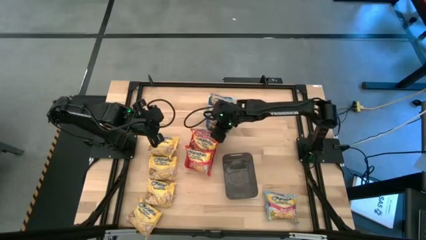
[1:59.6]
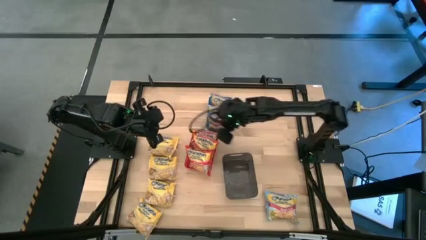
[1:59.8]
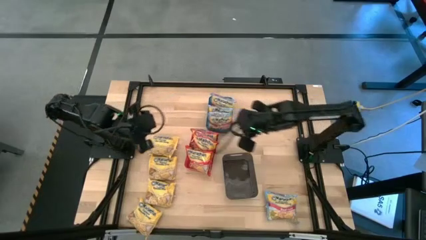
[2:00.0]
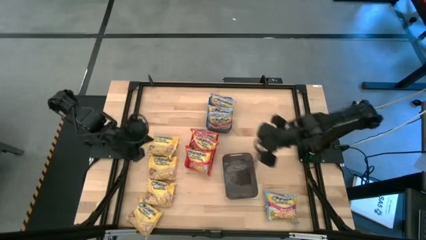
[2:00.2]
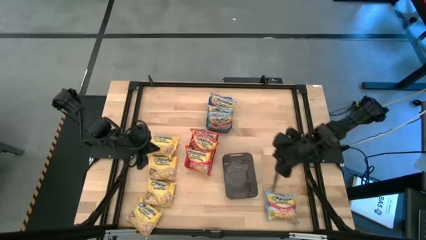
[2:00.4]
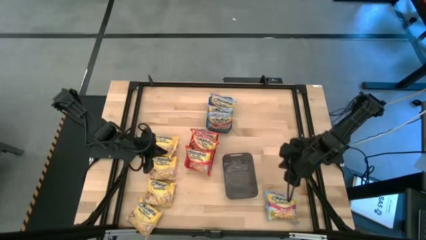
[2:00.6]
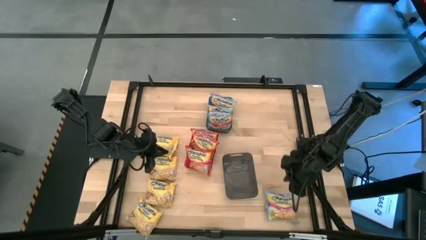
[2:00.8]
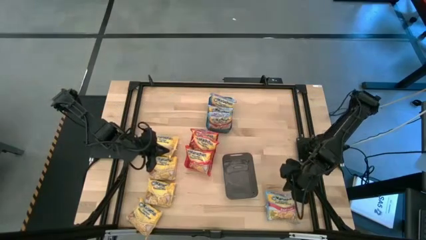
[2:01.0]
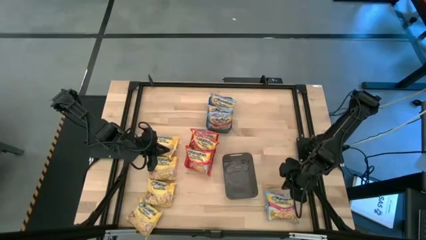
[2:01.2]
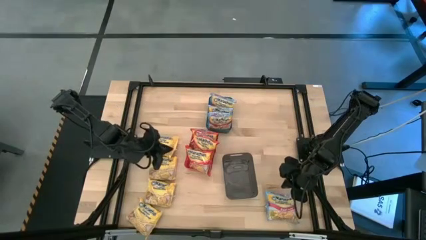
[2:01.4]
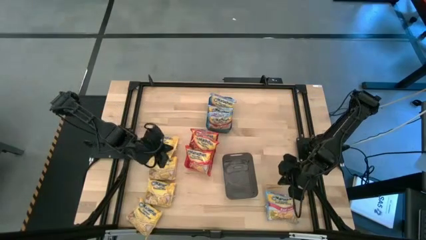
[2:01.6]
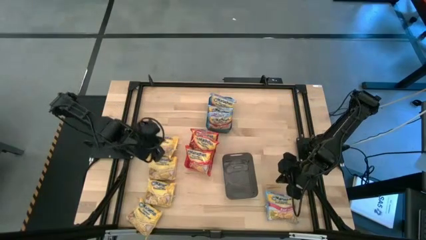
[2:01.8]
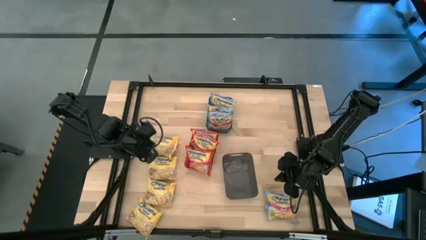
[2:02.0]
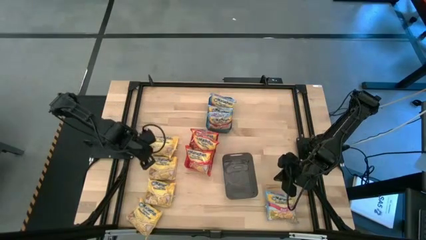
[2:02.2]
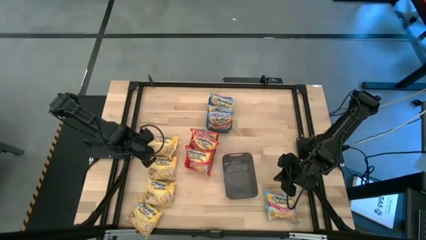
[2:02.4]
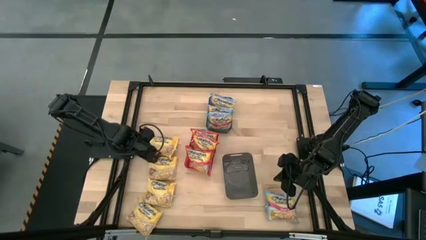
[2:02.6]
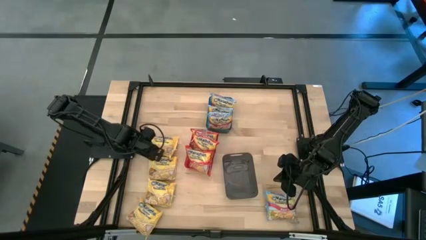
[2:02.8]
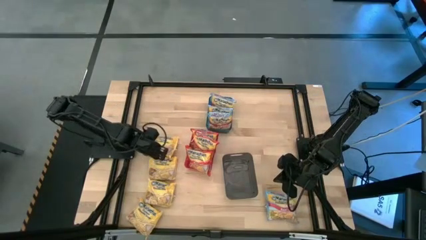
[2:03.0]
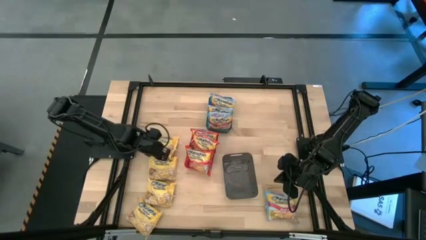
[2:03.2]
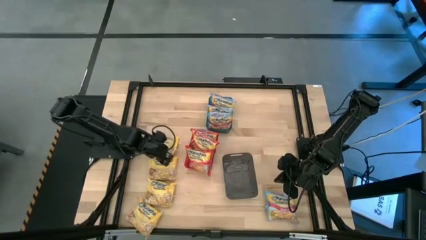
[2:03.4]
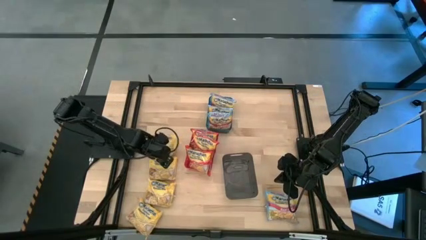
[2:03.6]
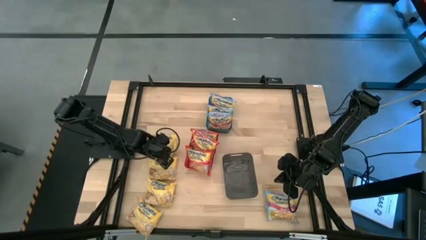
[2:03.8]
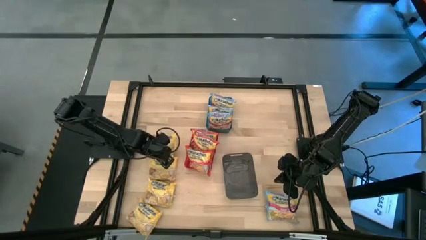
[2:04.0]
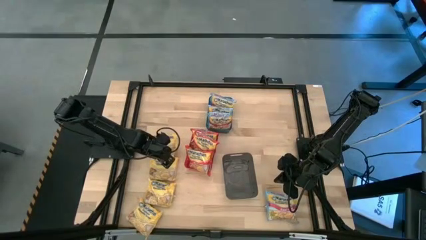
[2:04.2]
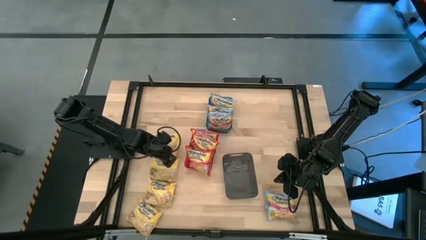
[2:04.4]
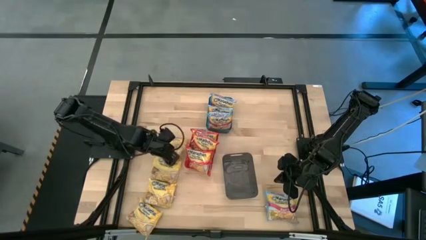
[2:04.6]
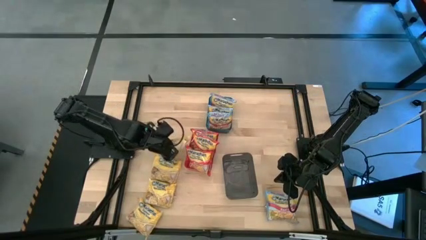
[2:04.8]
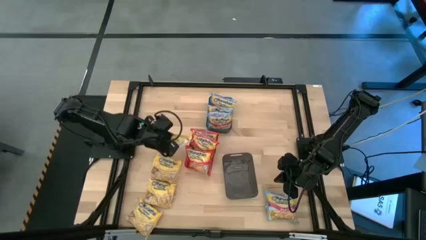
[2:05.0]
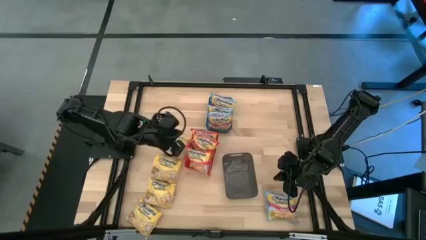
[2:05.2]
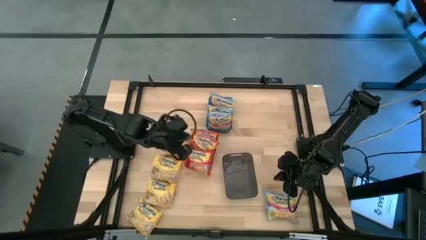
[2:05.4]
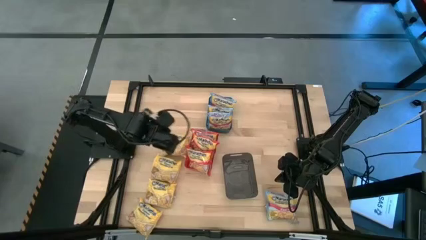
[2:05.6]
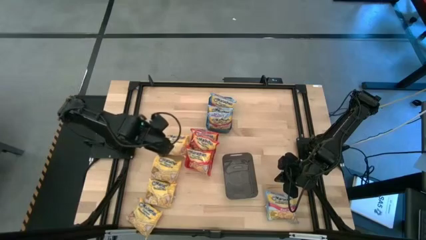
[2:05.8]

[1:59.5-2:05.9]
Task: Sort Maruchan noodles
Put the yellow bag into the black bin

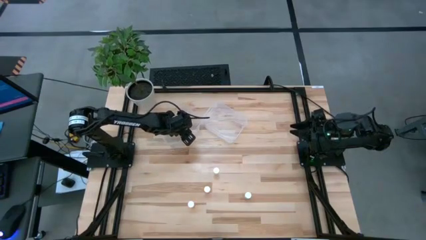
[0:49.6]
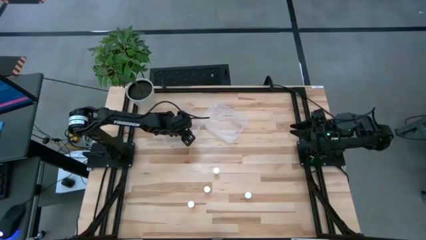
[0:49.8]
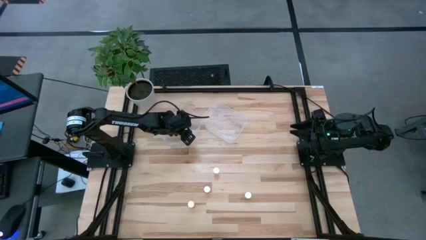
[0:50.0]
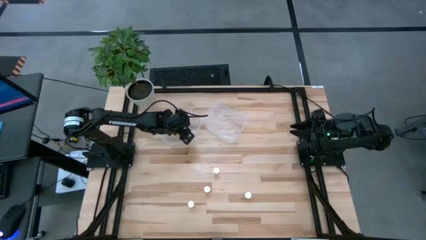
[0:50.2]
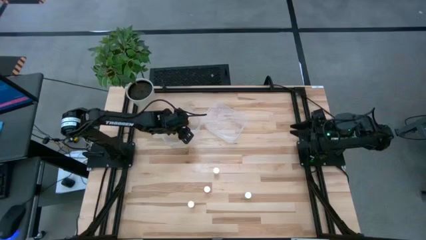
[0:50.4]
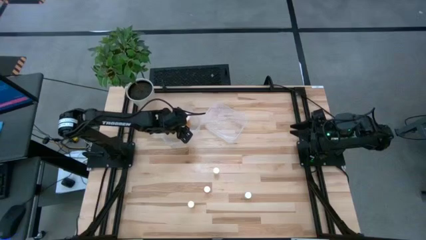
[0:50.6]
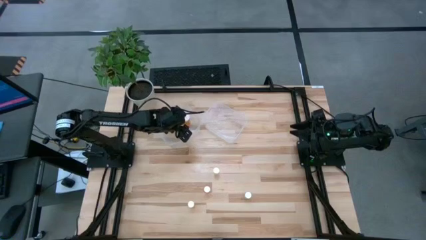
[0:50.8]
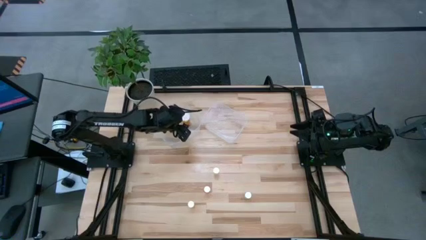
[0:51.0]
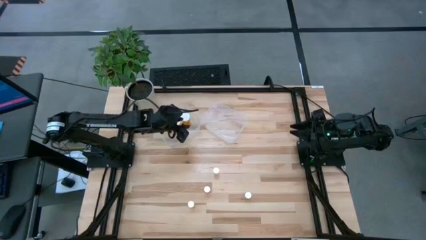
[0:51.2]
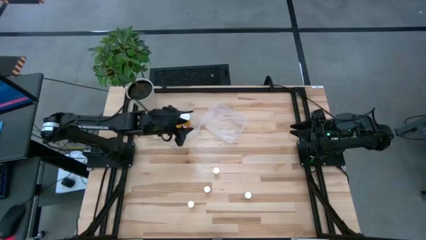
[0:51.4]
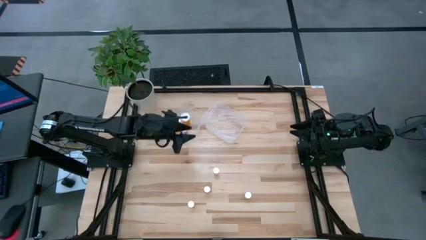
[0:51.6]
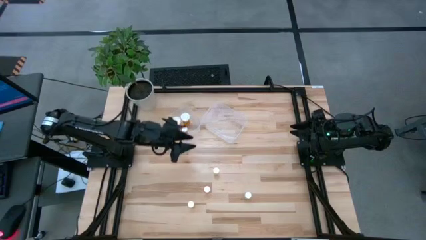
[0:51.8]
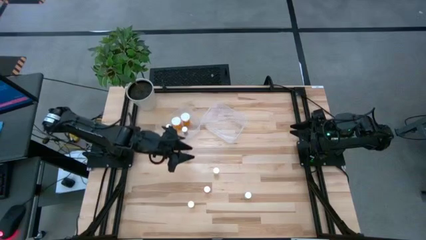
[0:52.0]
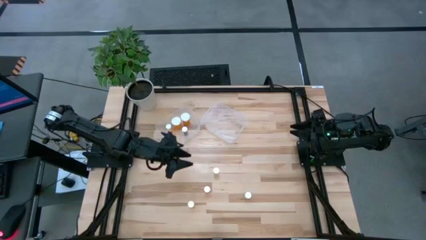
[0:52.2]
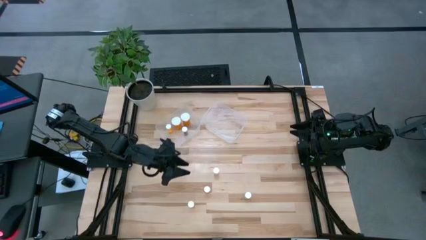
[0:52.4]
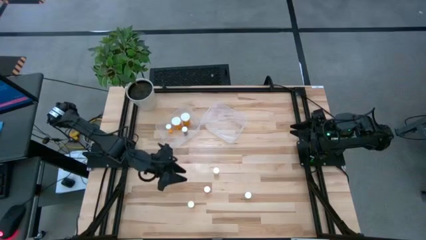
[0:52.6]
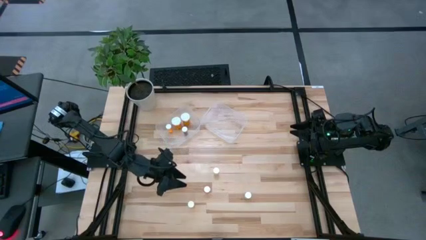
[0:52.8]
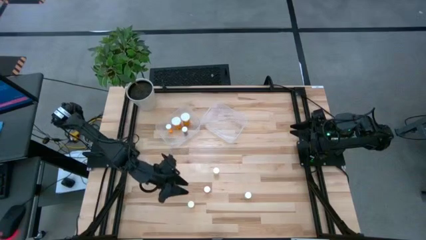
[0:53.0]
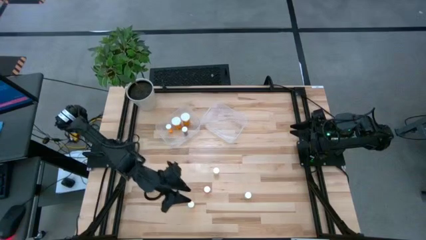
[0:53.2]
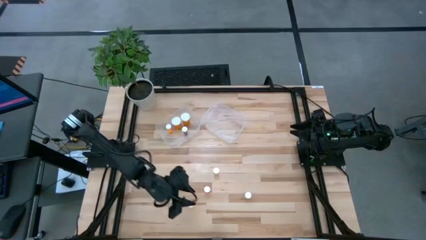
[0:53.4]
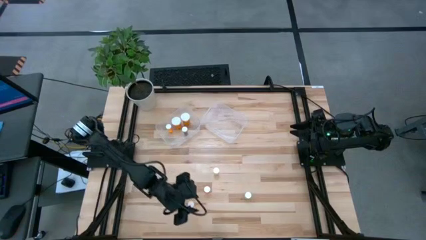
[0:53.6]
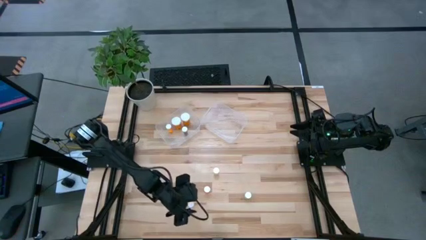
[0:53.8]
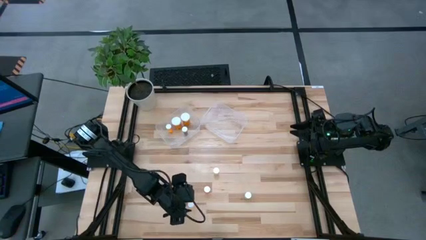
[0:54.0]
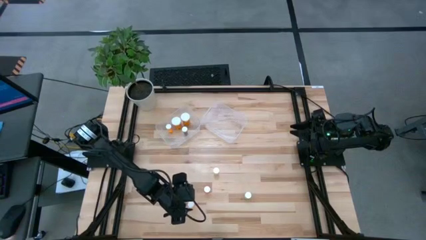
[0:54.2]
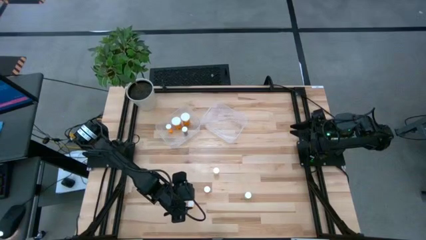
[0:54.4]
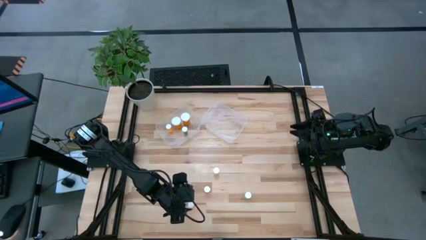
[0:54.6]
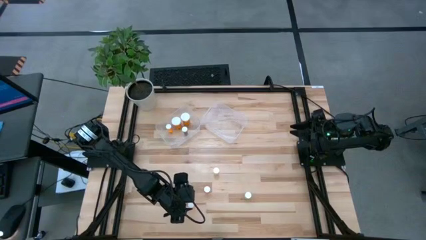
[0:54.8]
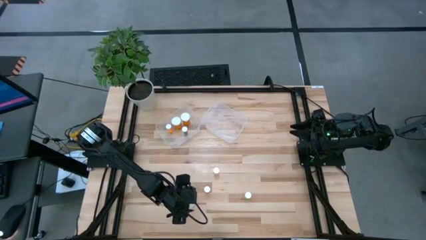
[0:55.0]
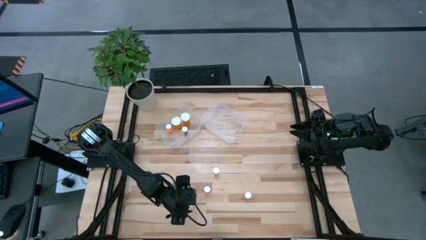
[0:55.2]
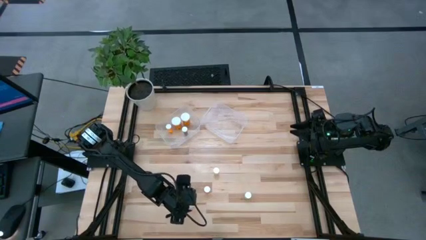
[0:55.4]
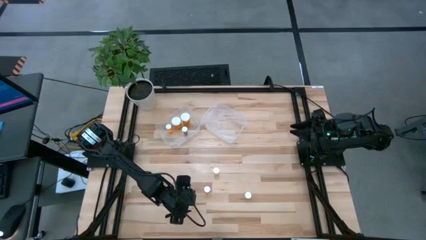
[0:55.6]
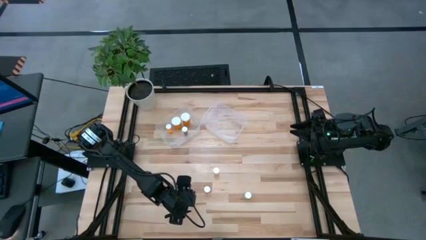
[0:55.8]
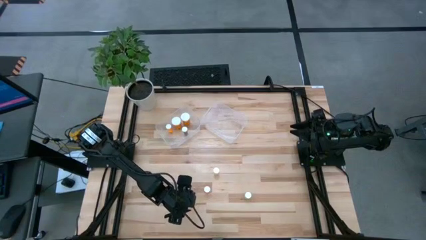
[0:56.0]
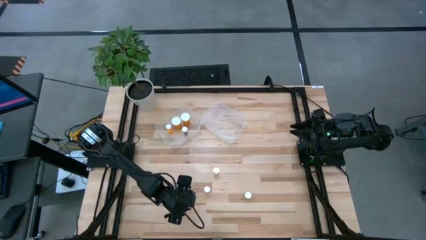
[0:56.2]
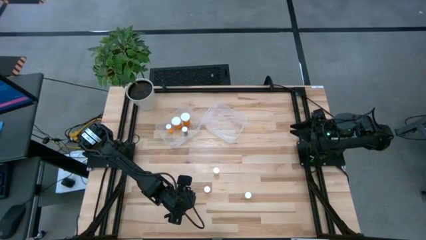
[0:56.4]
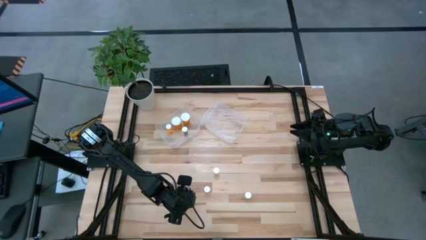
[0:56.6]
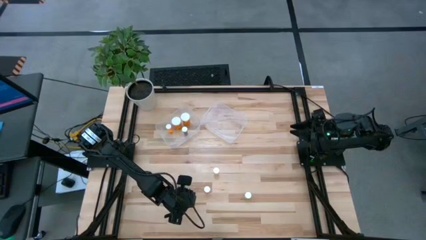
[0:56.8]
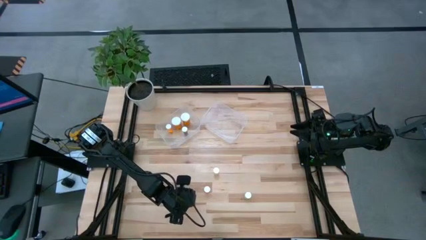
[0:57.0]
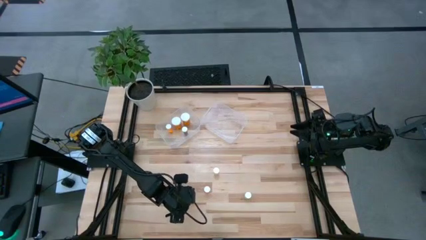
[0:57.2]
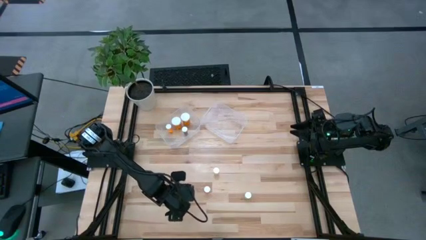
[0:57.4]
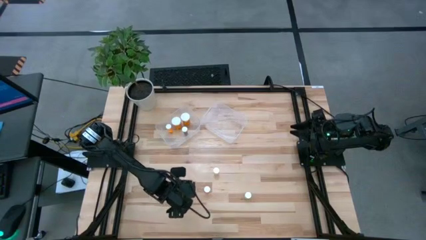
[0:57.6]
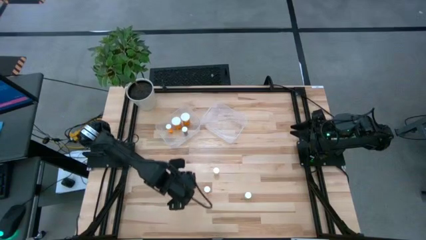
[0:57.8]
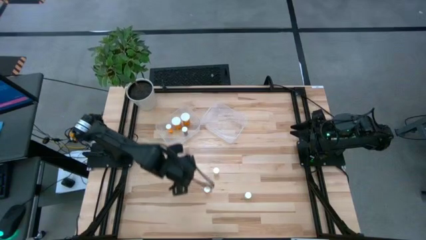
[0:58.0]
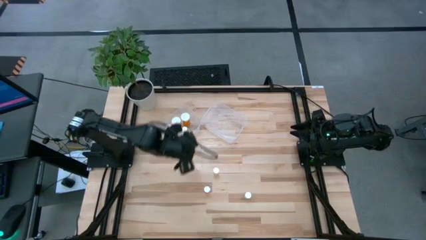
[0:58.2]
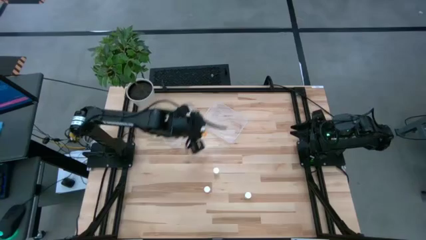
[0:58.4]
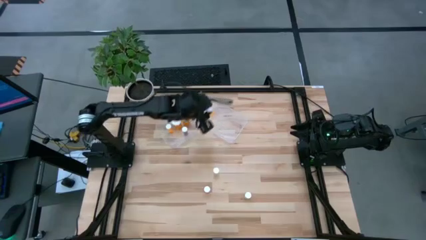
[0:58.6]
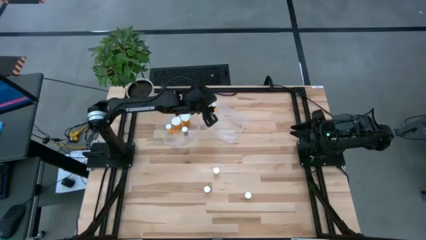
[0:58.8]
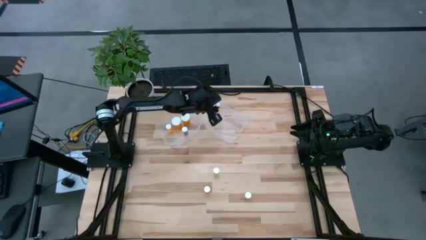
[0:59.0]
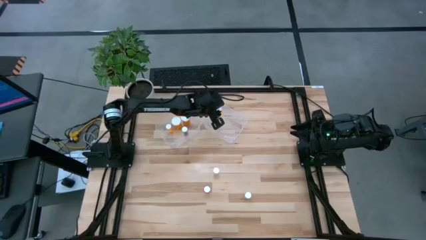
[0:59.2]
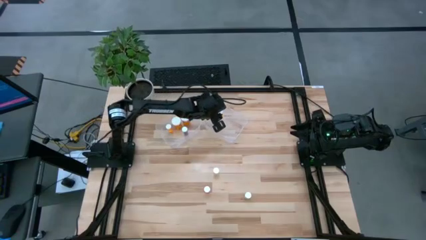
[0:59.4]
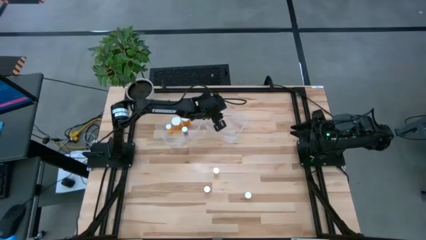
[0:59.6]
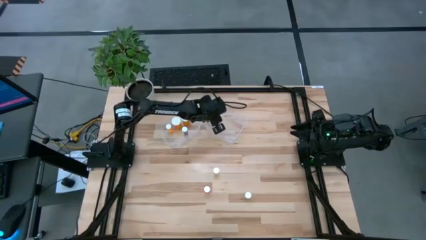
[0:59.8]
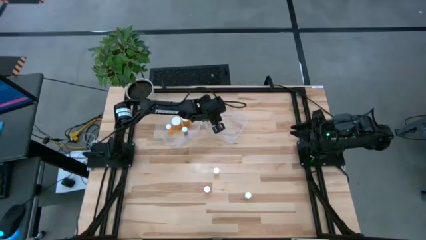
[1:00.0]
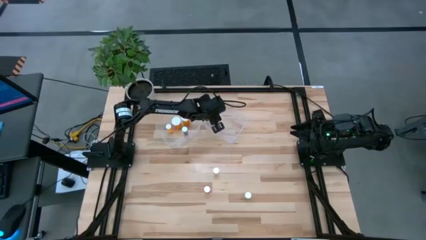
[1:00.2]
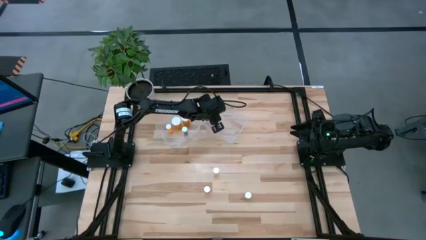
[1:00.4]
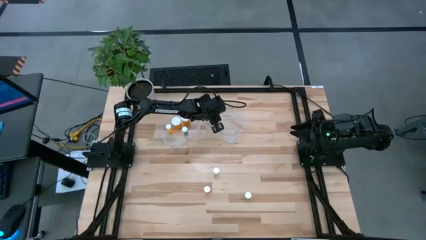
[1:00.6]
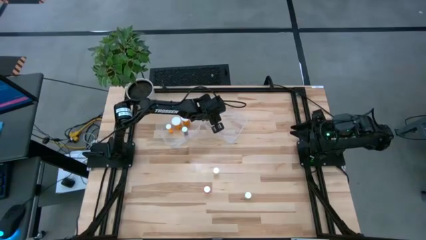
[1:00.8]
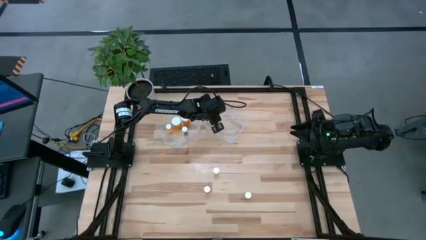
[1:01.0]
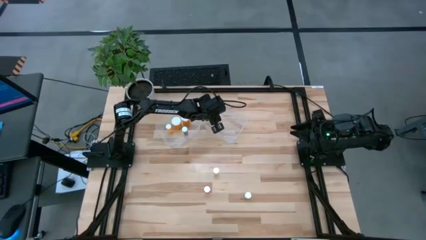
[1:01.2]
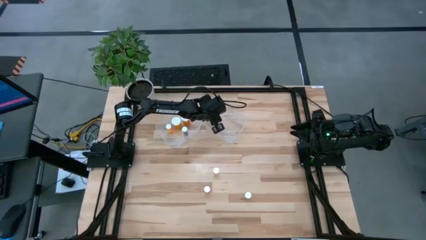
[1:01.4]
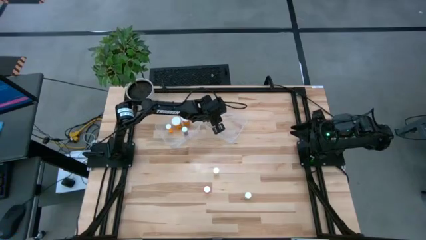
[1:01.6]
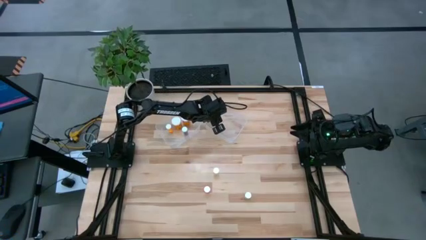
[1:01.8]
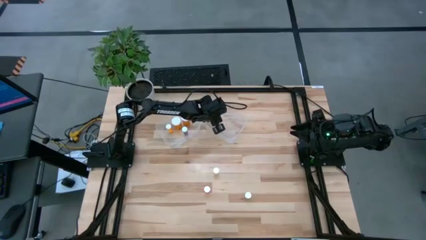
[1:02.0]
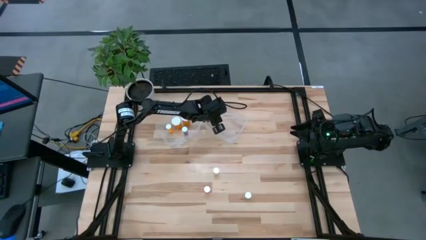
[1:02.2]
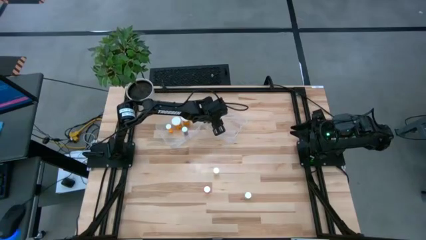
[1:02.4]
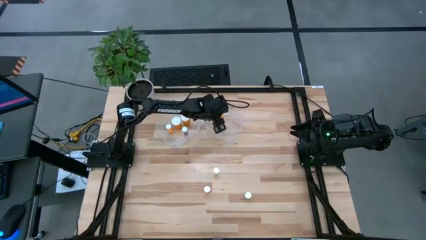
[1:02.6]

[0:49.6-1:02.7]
Task: Pick and place medicine bottles into bin by pill shape (circle, oval)
Put the small orange tablet bottle into the right transparent bin
